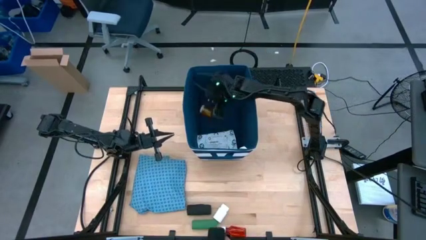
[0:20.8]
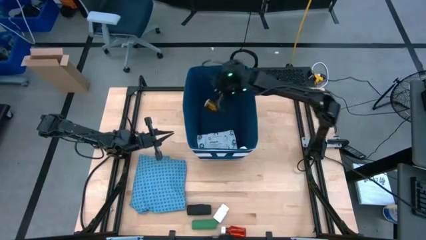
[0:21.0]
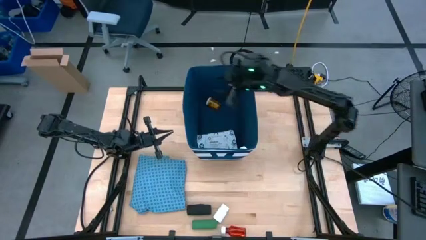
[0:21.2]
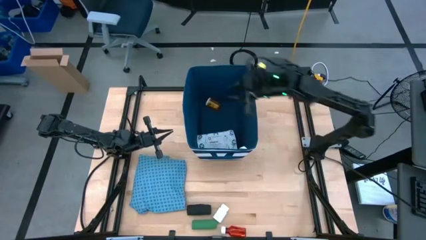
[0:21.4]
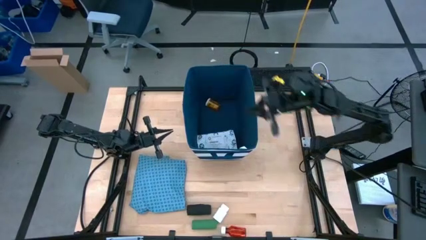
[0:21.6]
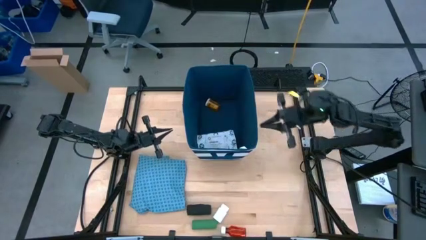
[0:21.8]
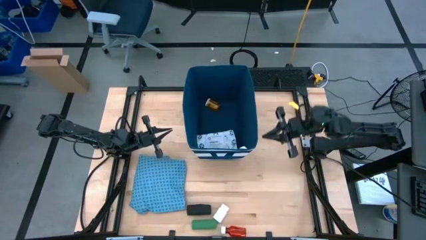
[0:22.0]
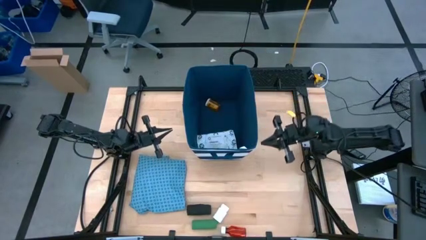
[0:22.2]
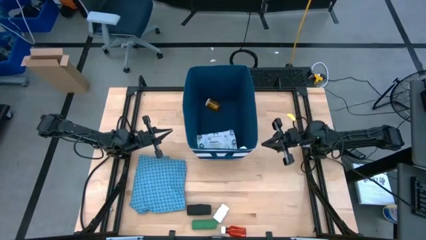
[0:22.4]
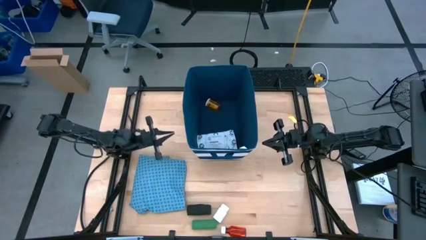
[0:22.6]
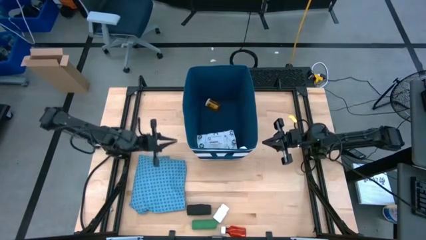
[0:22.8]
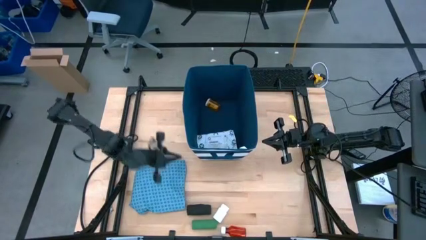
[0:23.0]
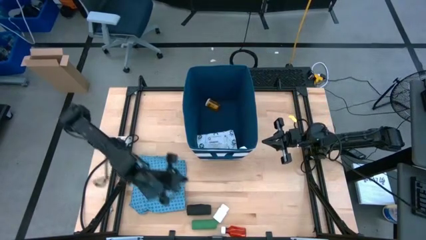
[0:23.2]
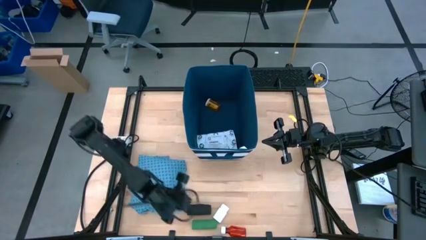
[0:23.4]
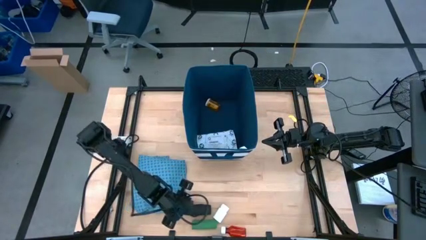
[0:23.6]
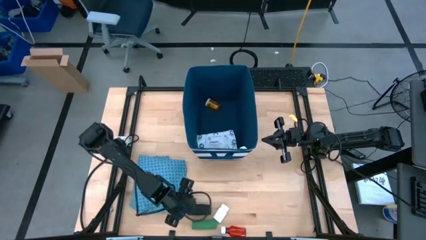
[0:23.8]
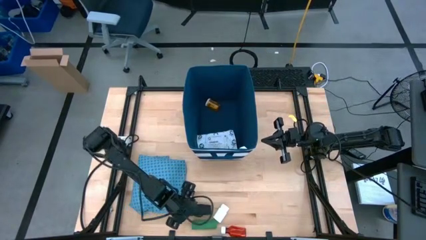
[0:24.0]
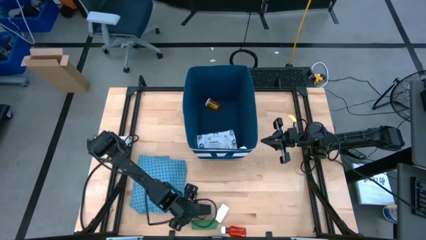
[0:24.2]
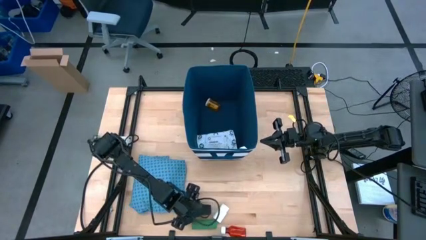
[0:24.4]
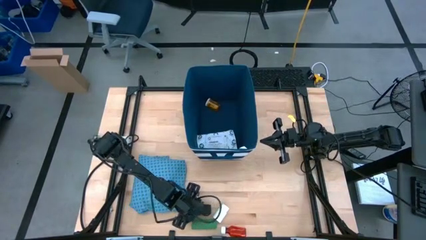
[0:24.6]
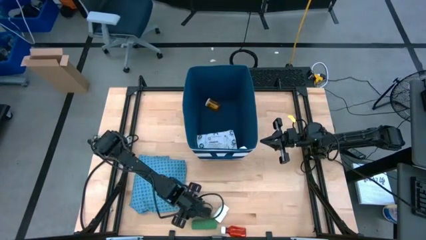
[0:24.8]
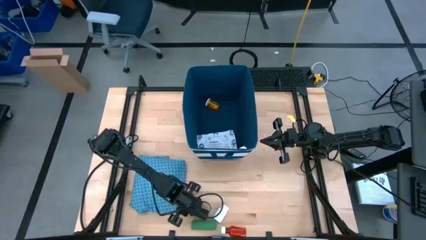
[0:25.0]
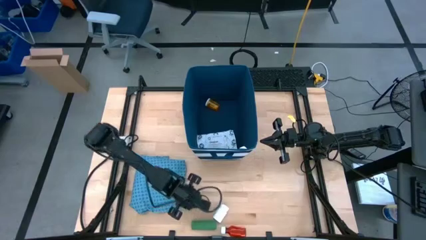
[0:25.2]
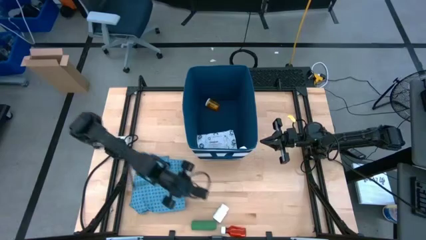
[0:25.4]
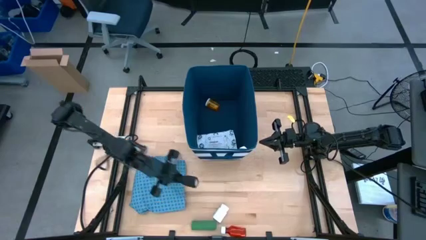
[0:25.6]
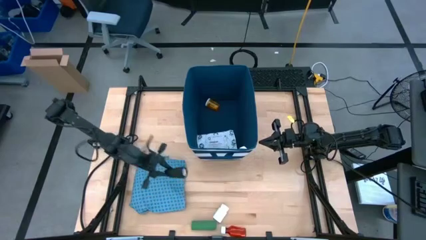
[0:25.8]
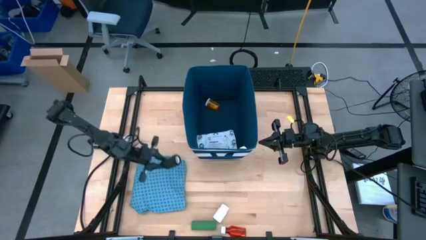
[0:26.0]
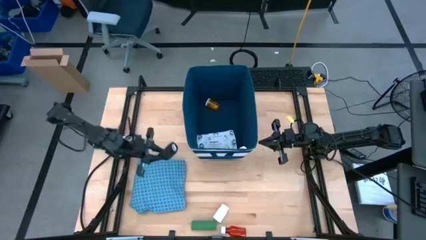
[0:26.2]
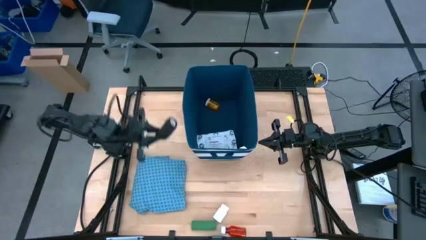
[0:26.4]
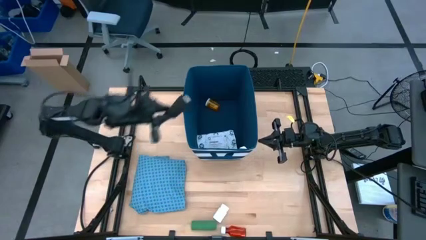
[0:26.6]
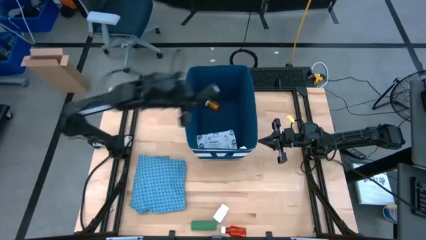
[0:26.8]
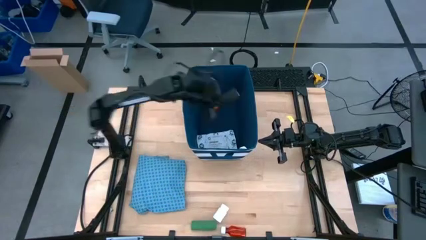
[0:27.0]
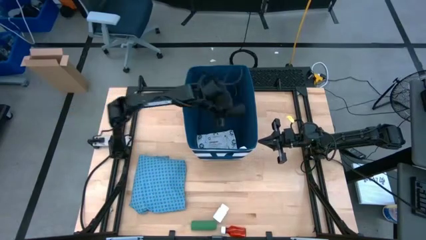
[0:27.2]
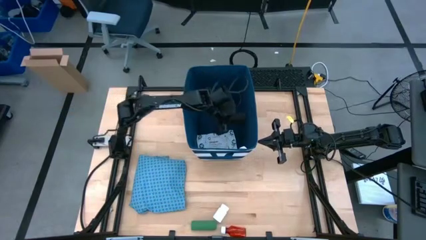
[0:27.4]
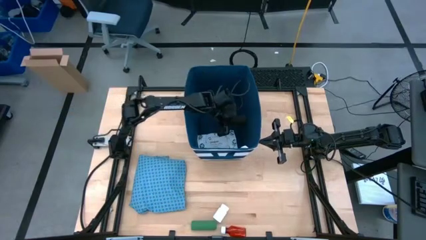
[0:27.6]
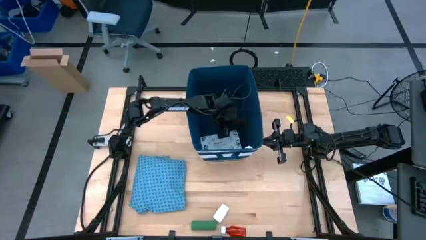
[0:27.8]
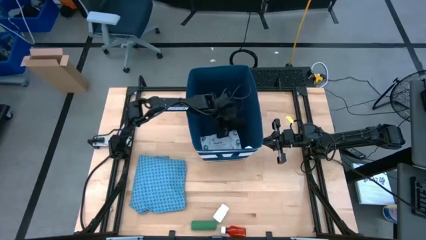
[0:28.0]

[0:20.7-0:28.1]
Task: Pick & place medical supplies in basket/bin
Put the black bandage into the blue bin

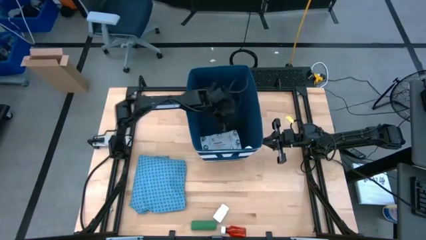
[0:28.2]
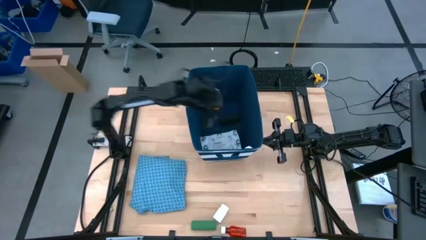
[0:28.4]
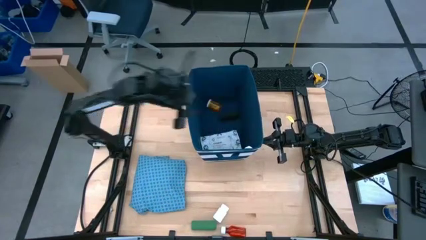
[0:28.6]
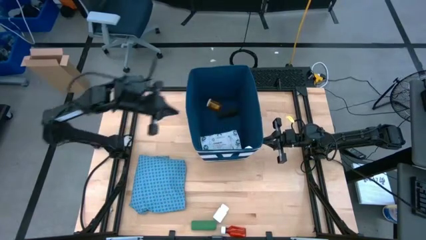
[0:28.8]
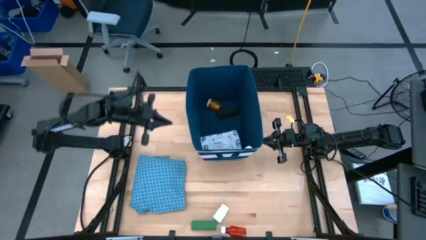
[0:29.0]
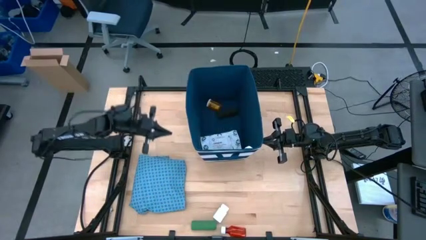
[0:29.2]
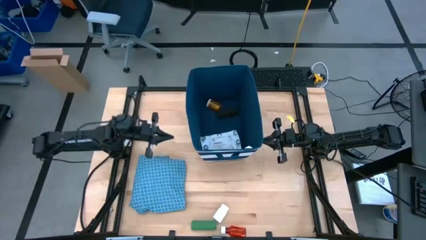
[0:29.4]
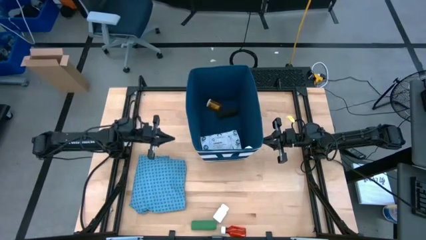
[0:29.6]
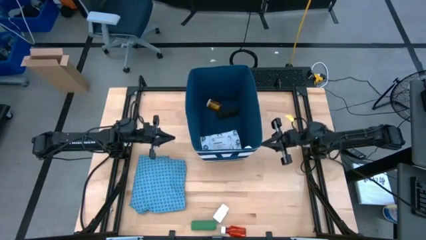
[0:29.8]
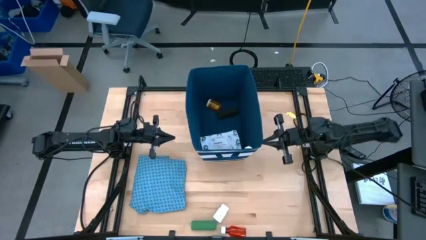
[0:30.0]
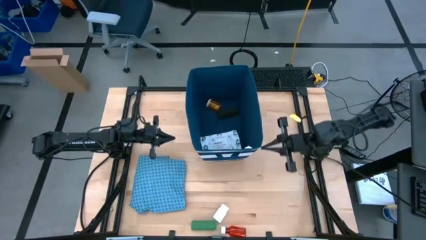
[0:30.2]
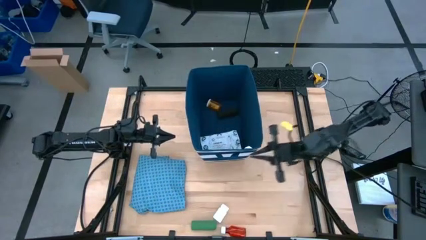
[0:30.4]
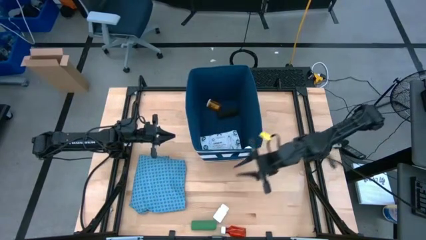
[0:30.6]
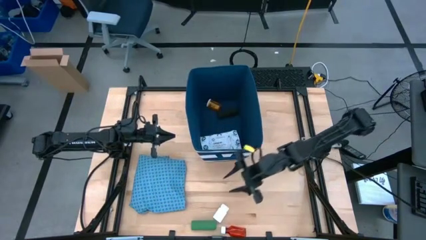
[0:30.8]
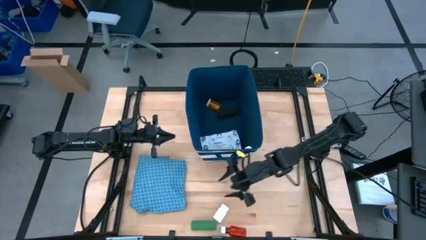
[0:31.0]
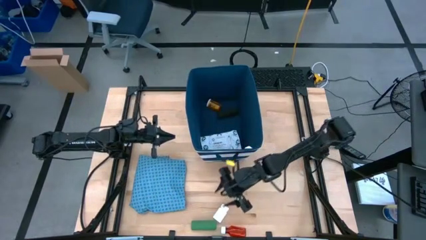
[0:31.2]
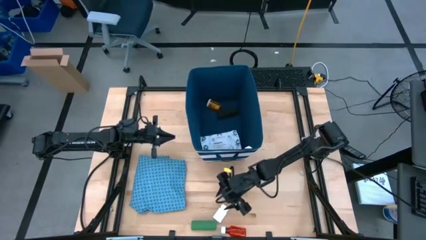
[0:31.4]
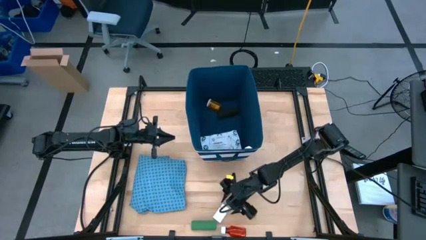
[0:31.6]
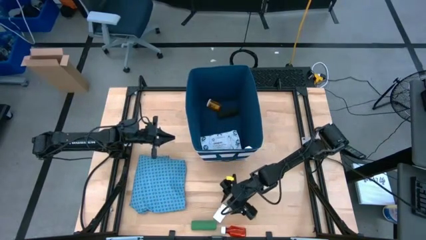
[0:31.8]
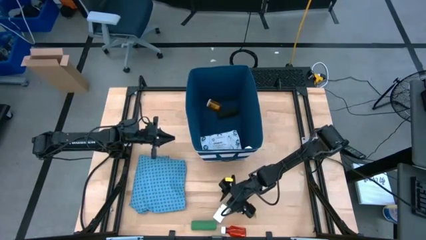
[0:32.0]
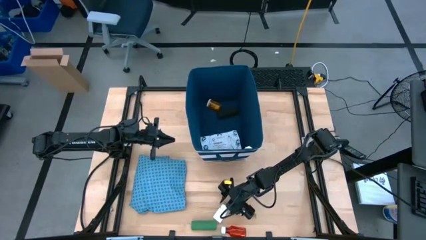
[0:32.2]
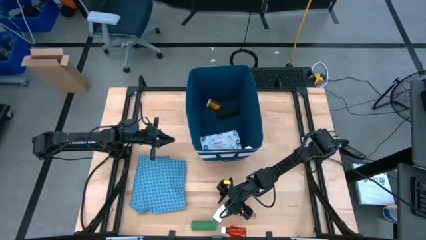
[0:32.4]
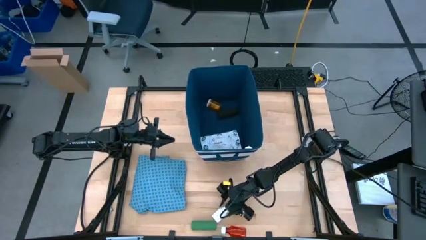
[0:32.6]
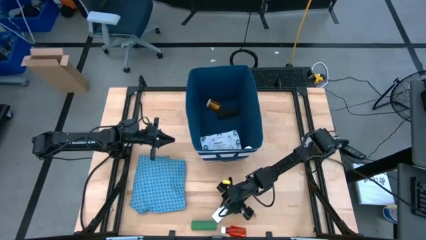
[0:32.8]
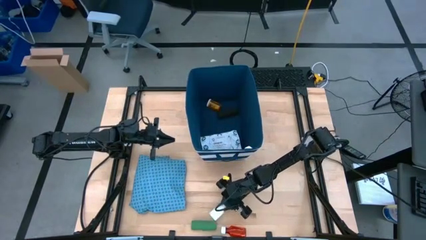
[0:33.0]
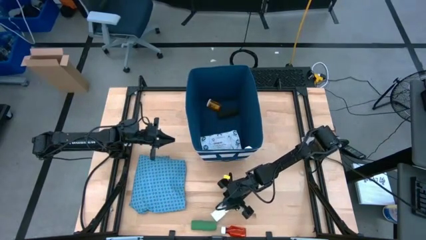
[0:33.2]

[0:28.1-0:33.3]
Put the white pill bottle into the blue bin

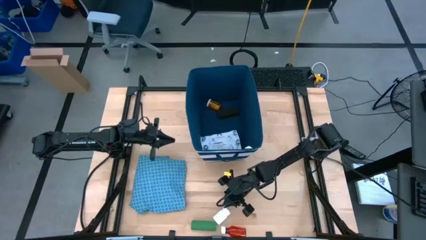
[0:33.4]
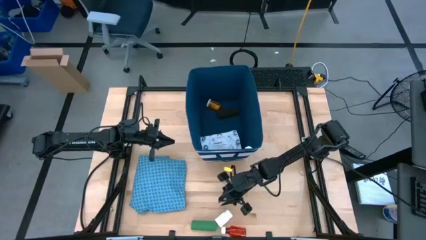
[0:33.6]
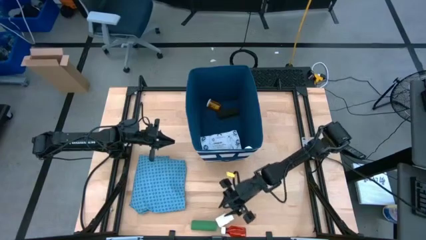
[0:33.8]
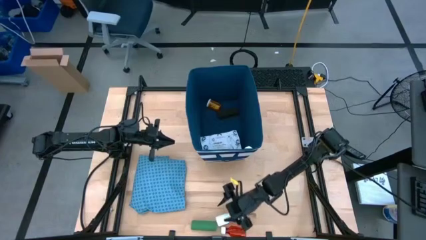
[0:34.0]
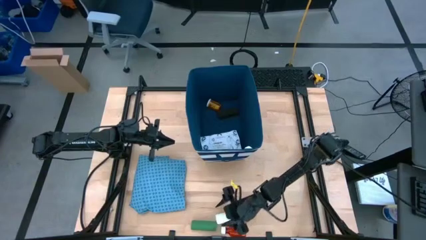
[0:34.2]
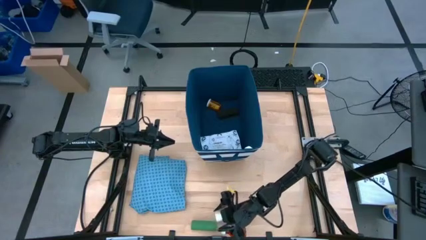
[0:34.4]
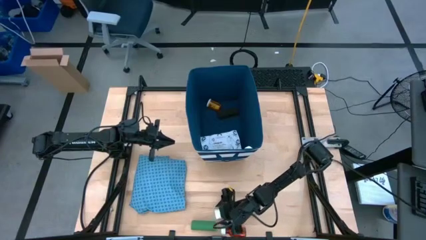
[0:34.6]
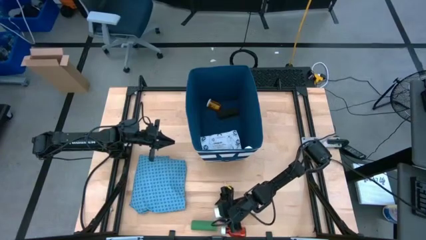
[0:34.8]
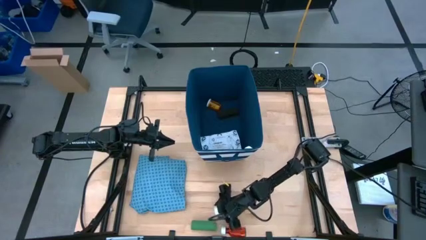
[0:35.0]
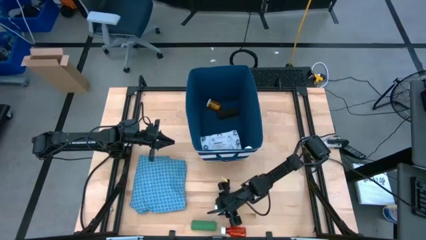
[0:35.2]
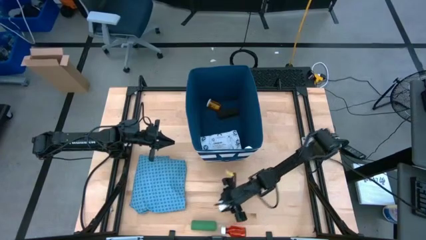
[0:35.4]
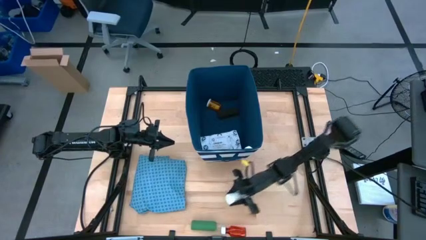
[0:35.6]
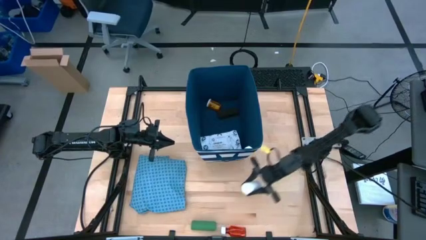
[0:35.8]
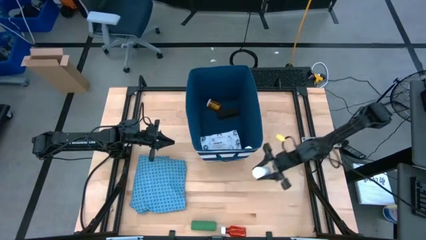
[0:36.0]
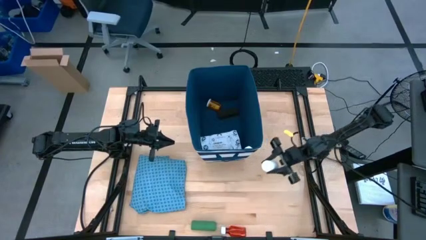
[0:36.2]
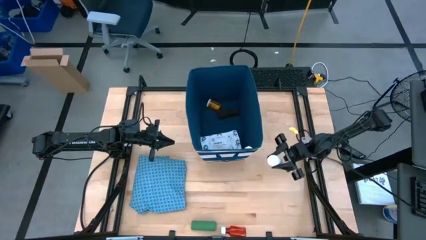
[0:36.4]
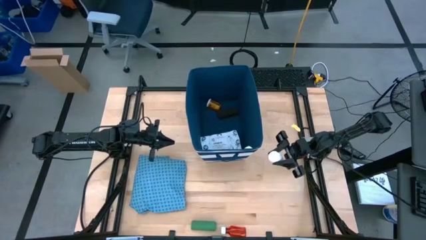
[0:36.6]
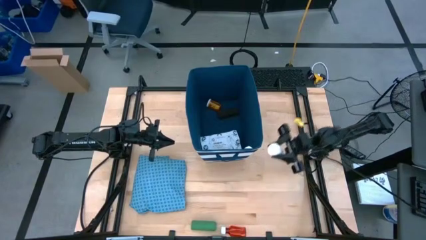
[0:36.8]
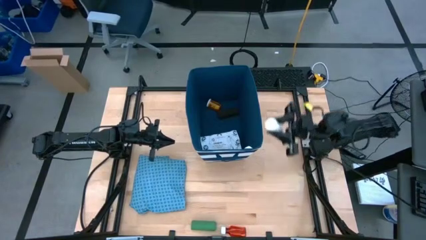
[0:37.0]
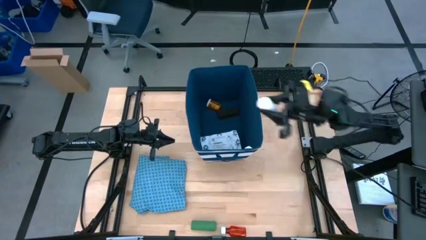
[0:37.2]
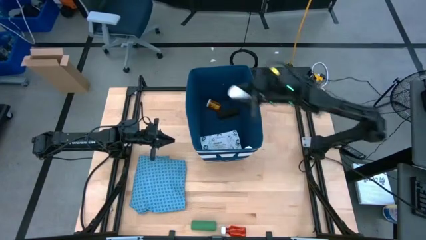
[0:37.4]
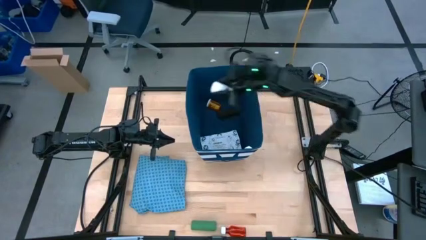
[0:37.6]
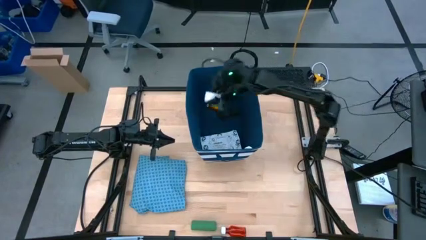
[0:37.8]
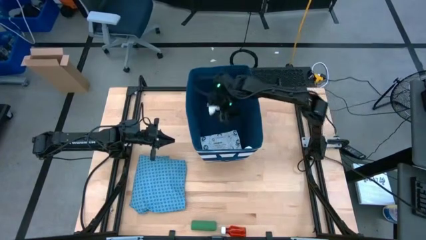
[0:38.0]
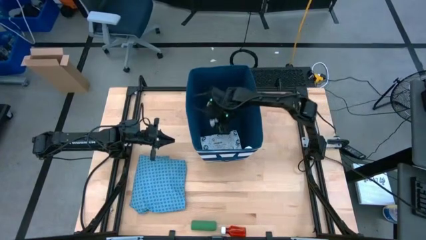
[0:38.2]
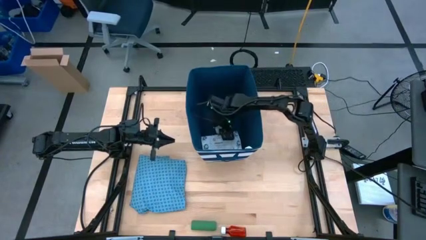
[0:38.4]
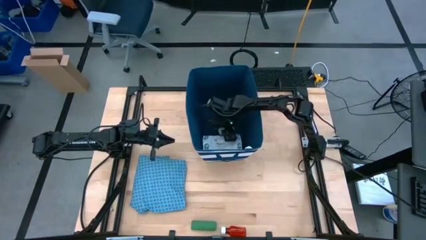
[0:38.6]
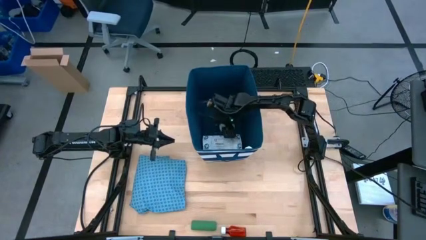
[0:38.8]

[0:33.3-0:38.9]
Put the white pill bottle into the blue bin
